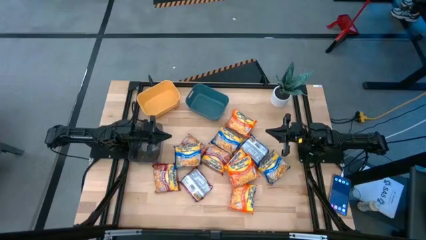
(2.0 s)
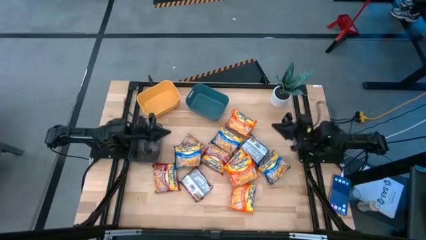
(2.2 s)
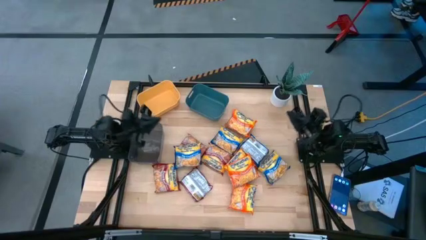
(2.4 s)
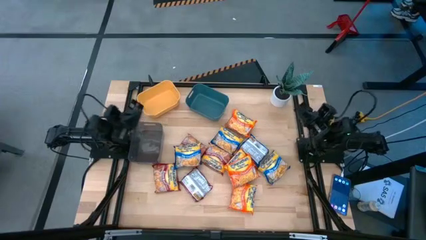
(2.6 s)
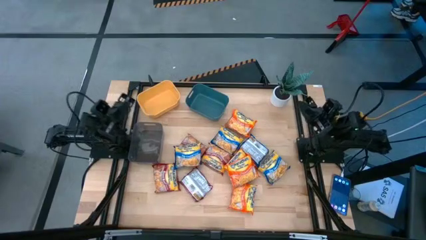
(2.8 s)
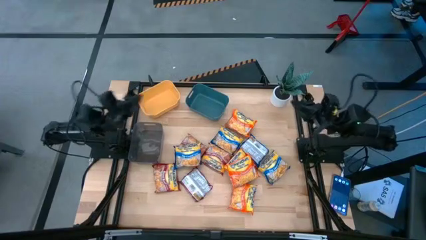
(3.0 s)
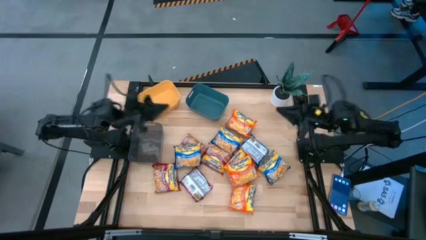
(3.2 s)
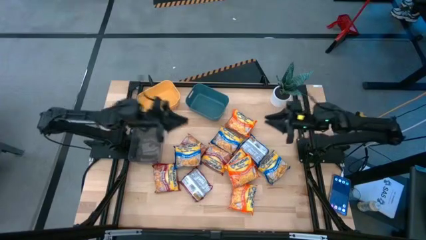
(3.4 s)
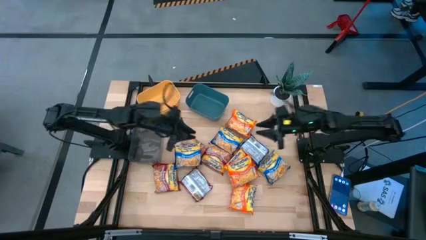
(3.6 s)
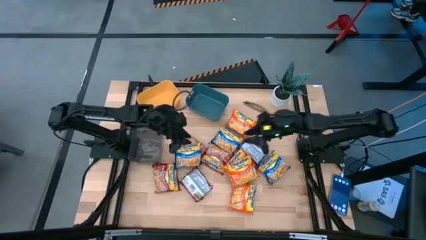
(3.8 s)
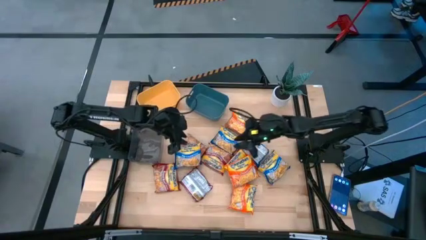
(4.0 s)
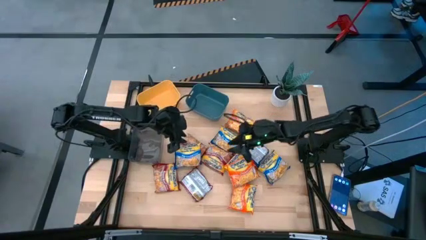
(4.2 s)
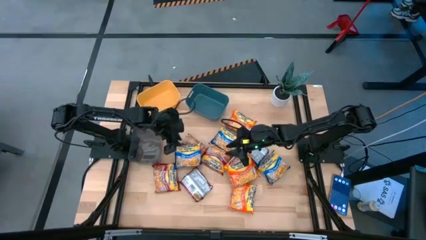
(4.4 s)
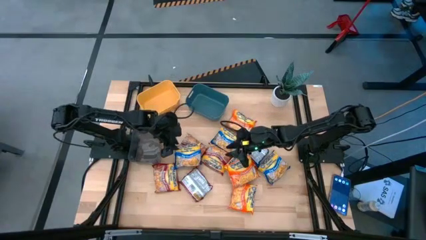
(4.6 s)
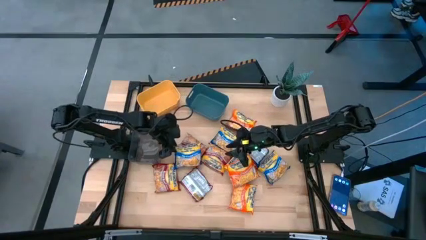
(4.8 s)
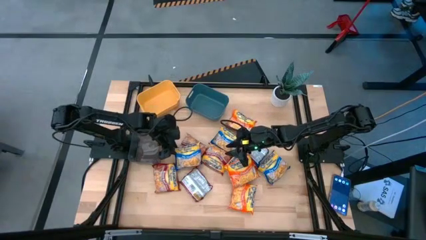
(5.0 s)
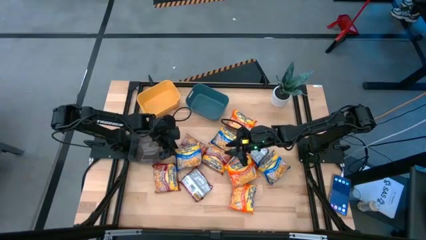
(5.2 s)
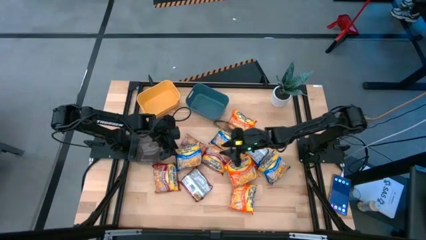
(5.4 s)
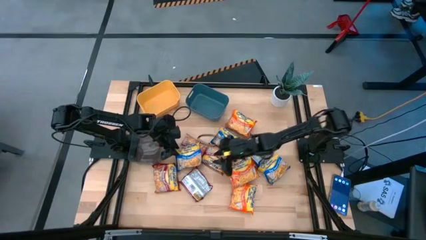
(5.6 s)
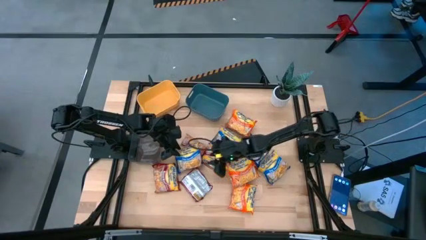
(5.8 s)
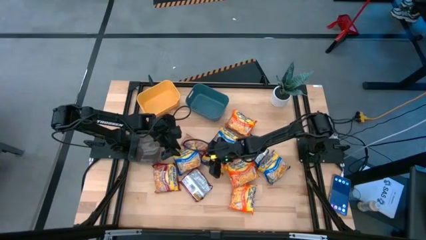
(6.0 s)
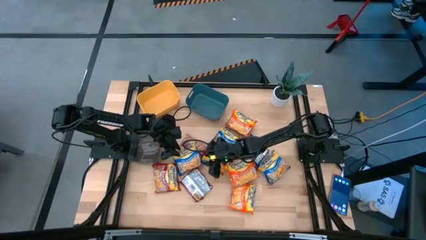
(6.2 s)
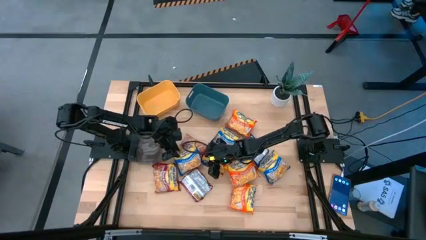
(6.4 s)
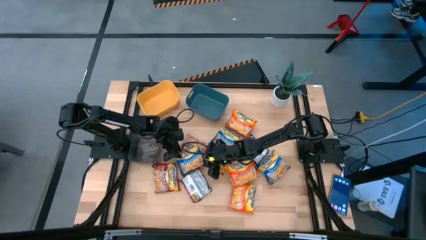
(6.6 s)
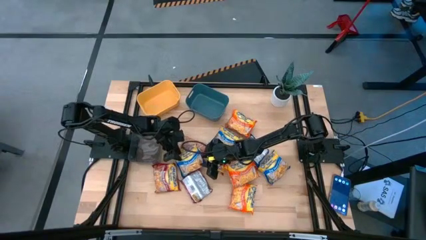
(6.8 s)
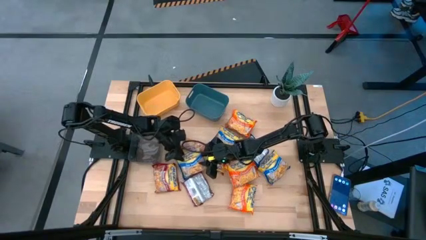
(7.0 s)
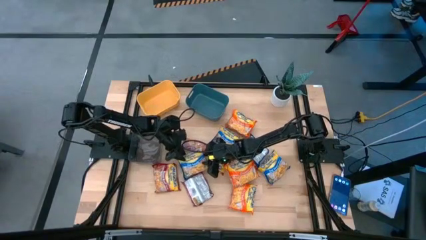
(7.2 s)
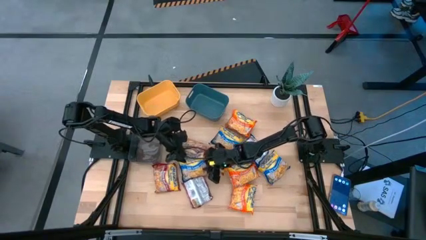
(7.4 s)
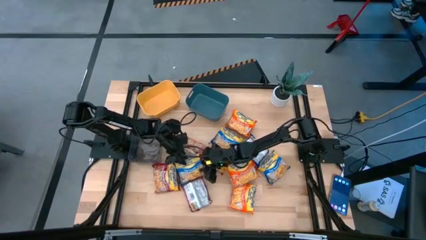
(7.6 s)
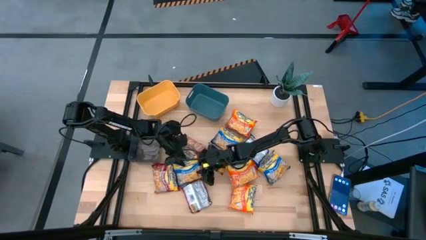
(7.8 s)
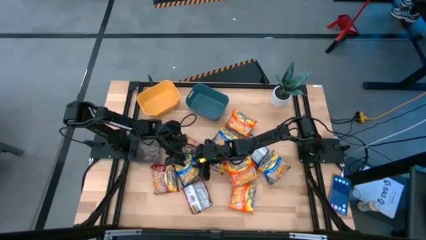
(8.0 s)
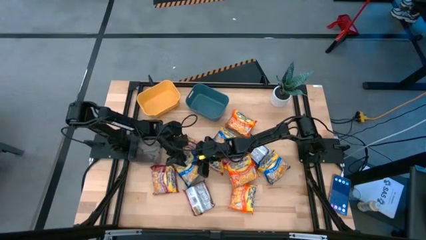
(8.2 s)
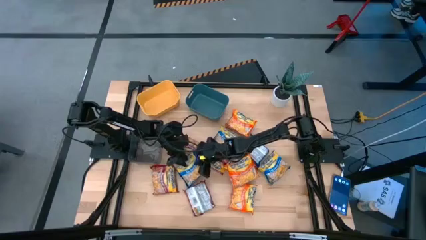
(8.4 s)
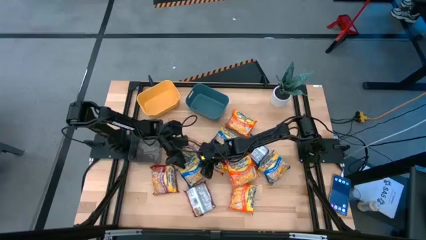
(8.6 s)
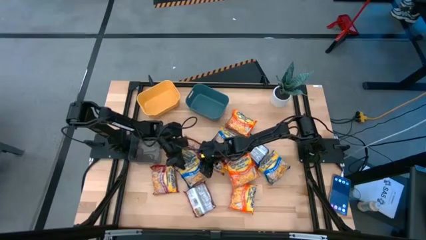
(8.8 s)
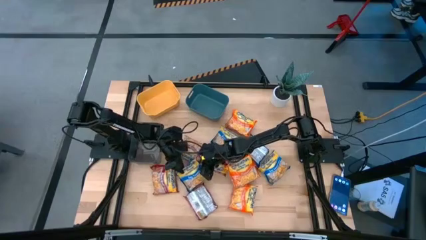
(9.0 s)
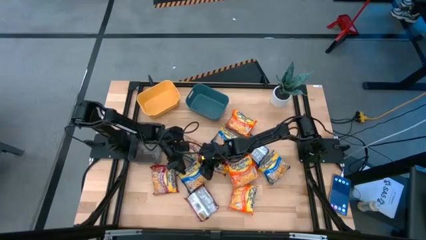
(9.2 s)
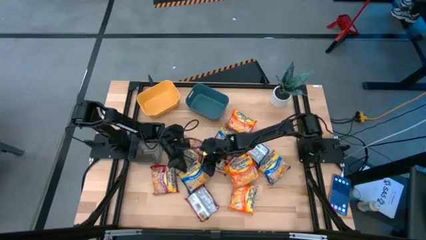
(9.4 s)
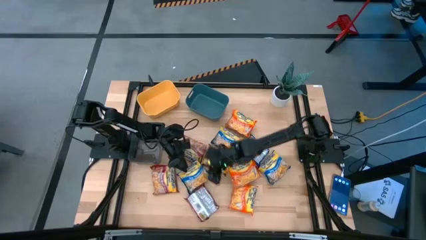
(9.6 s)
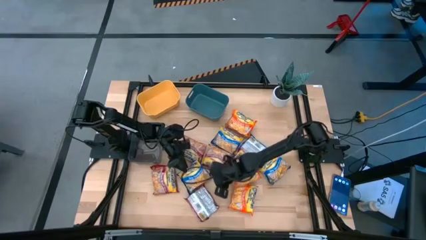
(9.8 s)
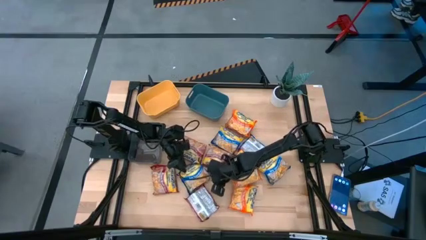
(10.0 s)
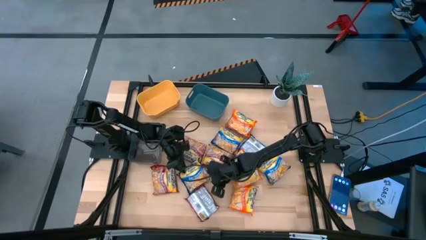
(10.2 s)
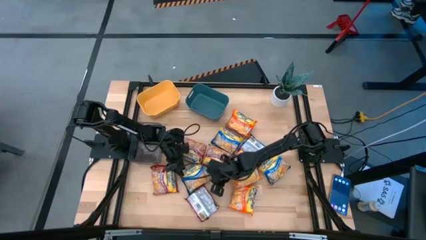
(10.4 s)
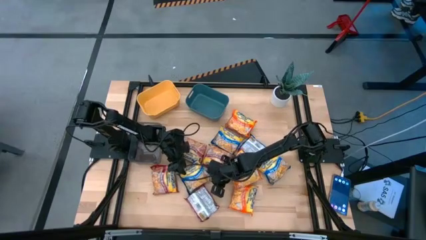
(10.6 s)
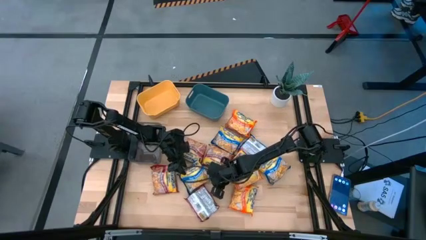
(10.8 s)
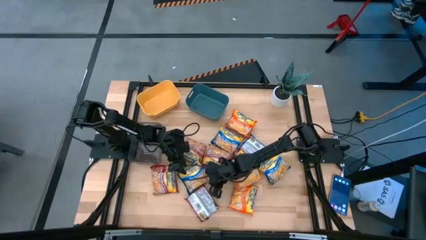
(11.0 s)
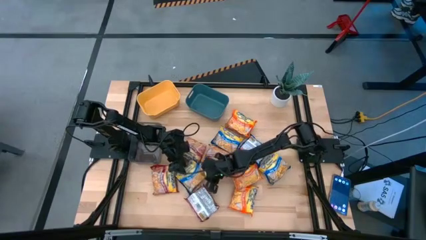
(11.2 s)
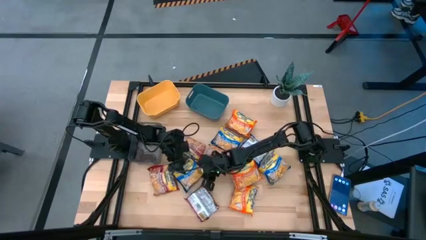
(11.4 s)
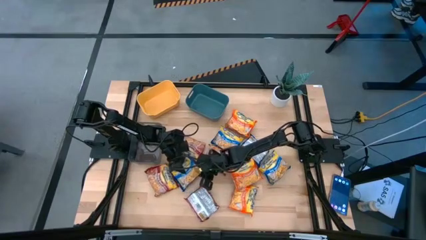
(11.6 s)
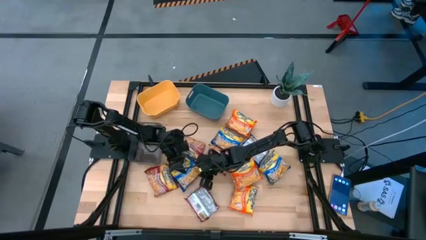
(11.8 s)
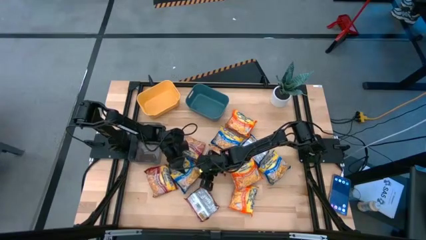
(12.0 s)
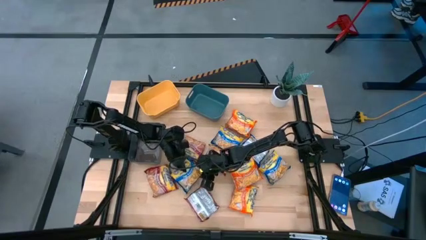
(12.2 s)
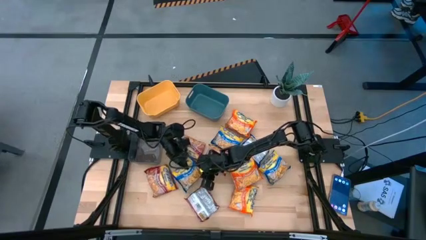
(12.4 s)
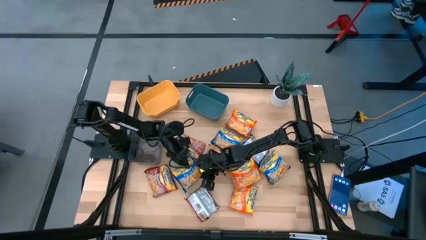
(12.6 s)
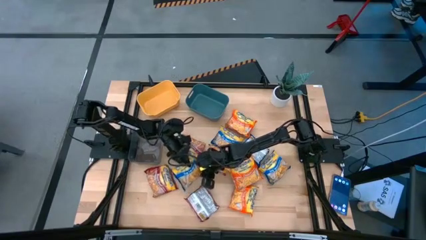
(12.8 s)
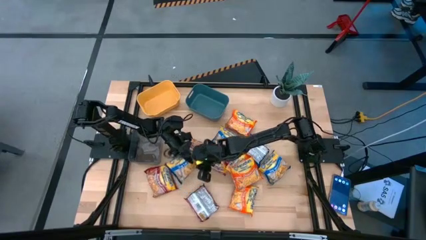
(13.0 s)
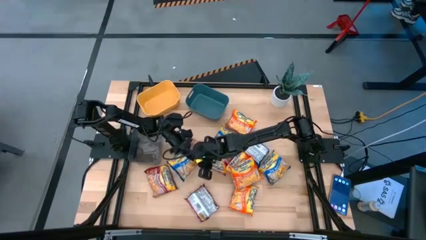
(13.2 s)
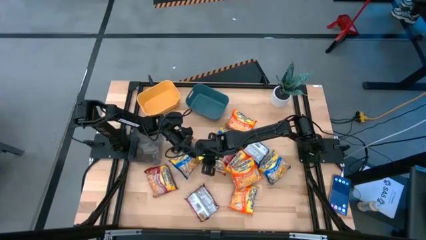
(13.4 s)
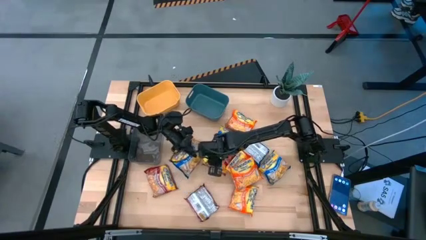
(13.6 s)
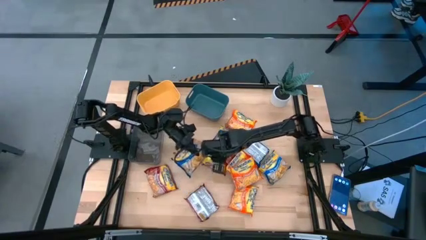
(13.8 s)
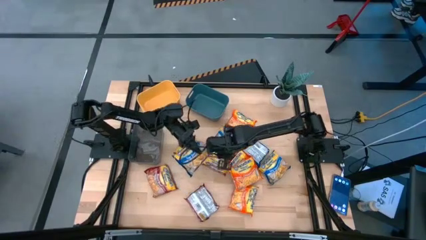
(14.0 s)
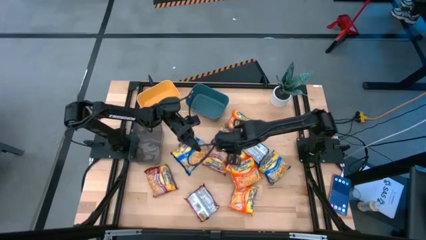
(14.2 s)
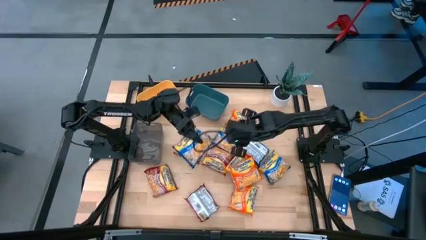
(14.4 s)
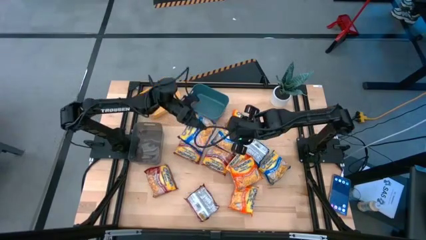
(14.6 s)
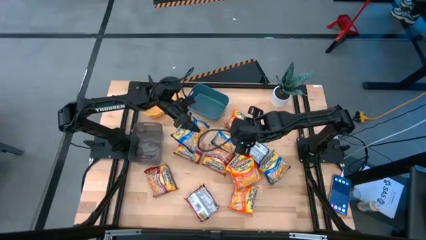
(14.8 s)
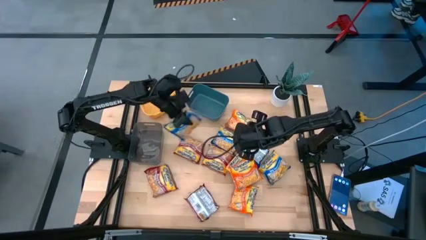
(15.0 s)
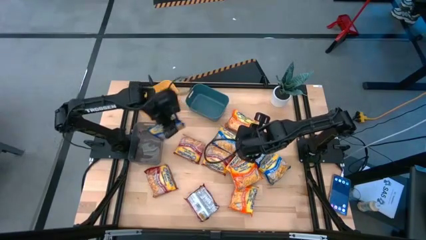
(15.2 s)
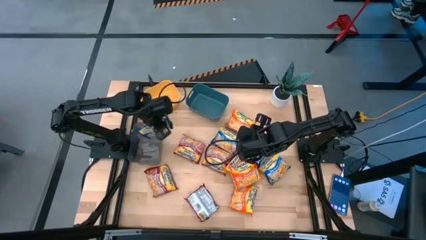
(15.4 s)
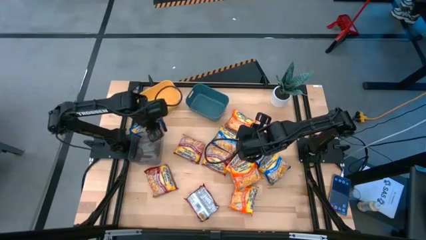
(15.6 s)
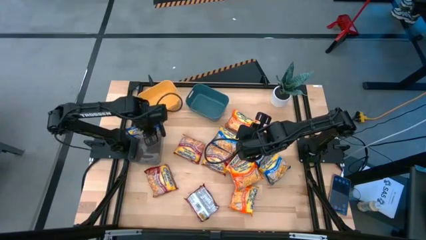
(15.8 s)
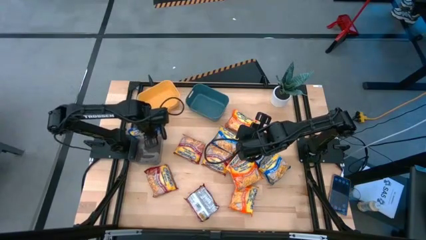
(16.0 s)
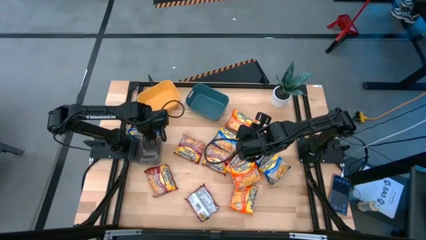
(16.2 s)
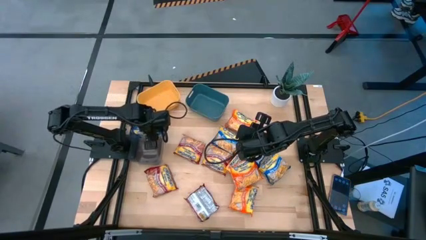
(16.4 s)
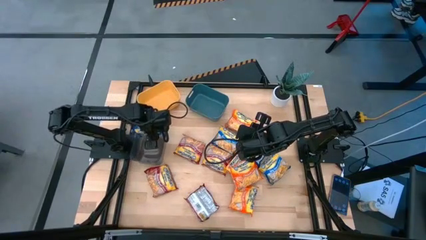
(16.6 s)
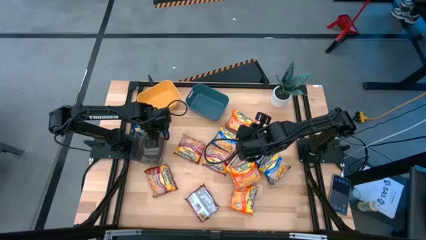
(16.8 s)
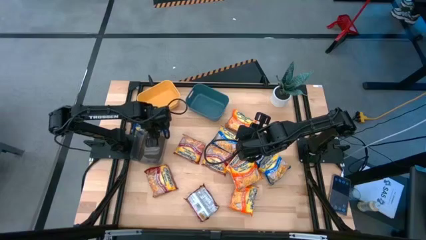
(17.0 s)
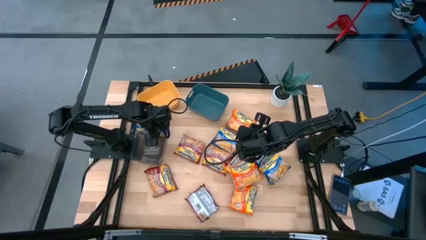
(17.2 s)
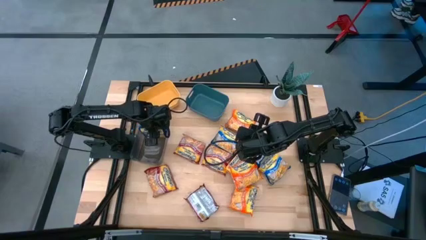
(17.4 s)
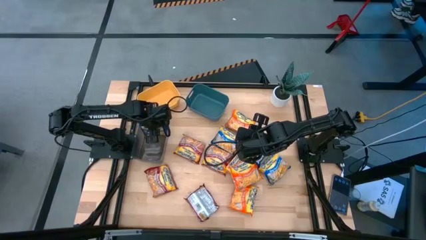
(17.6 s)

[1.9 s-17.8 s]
Task: Sort Maruchan noodles
Put the blue noodle pack into the black bin
